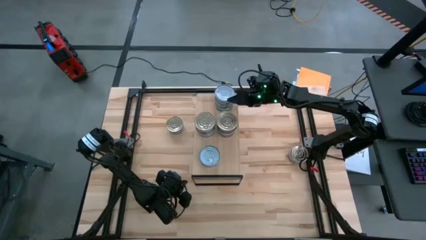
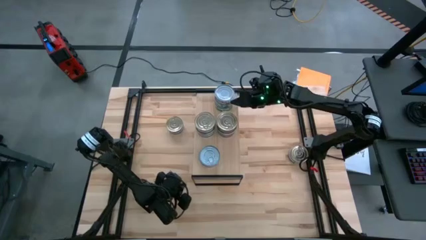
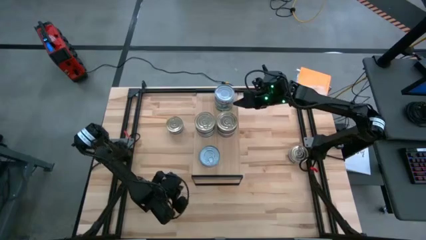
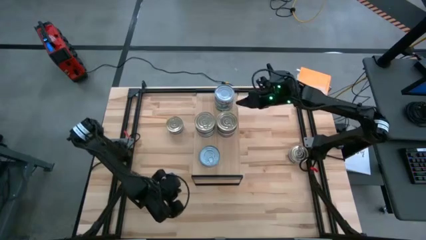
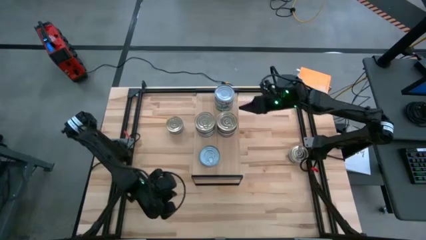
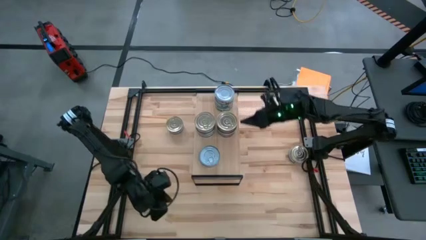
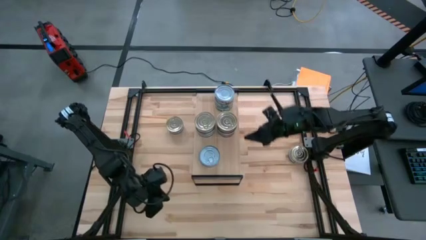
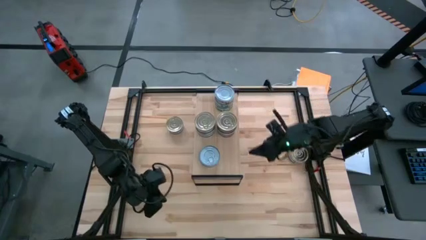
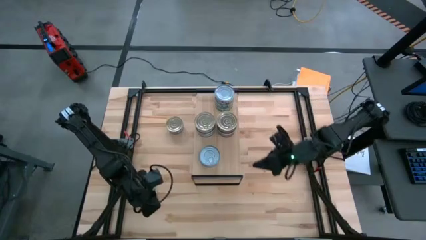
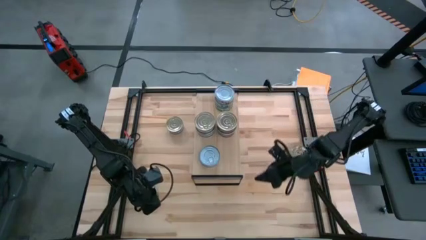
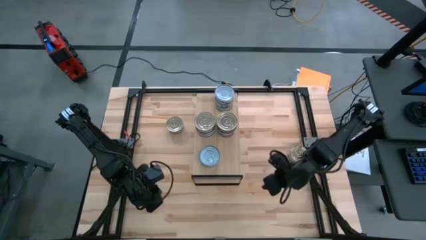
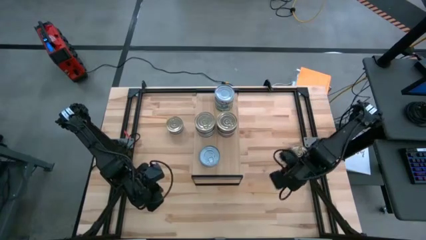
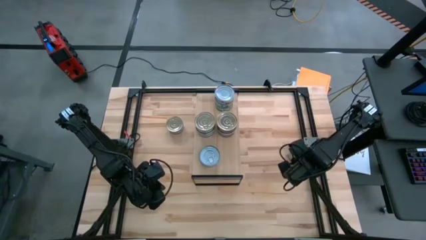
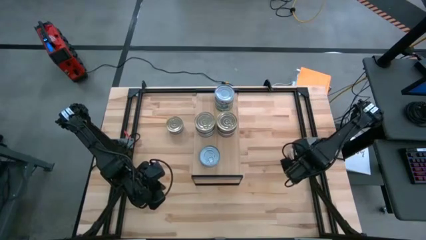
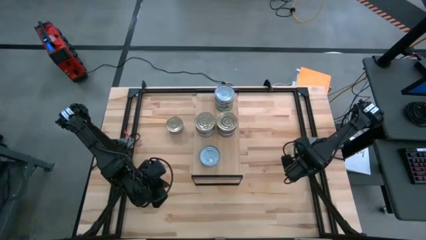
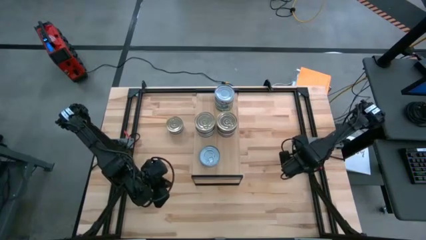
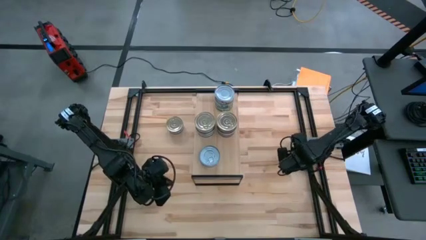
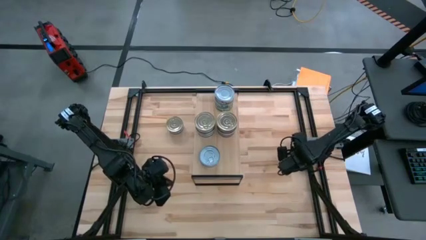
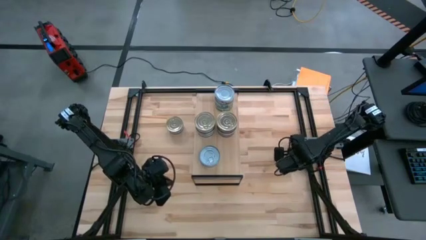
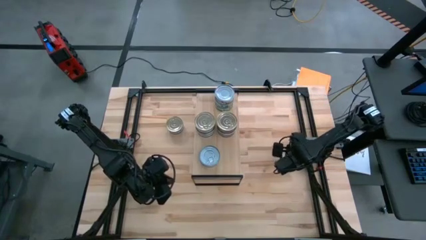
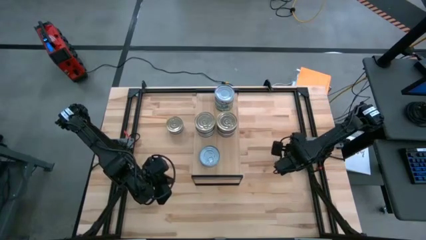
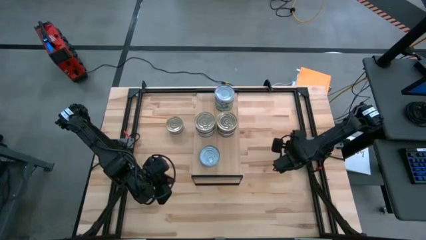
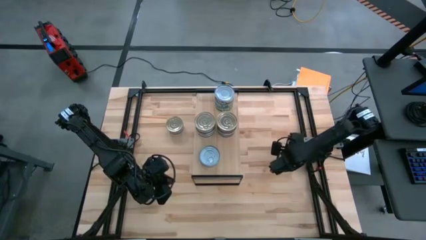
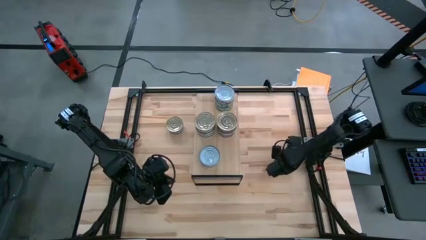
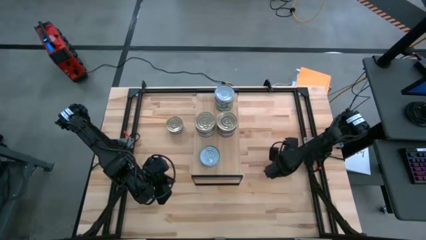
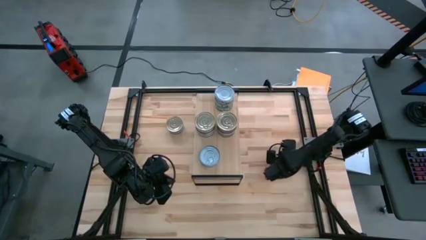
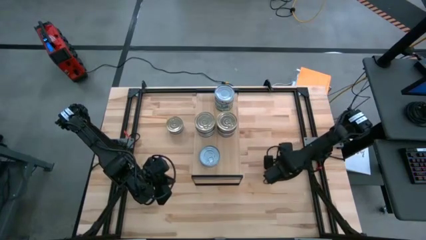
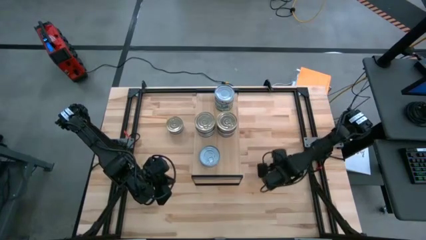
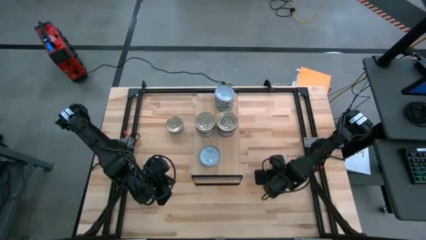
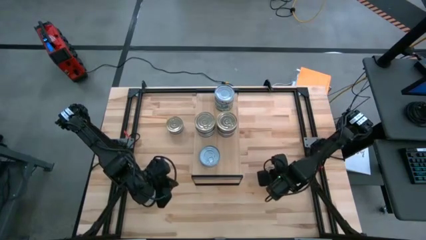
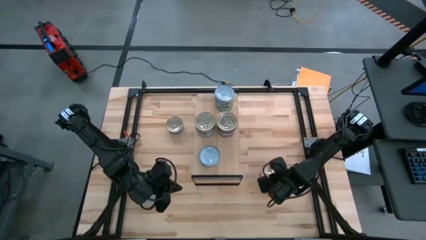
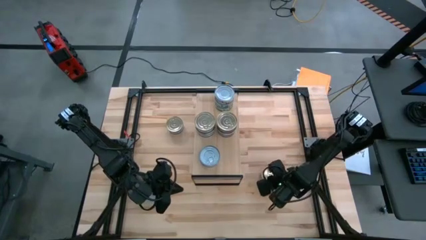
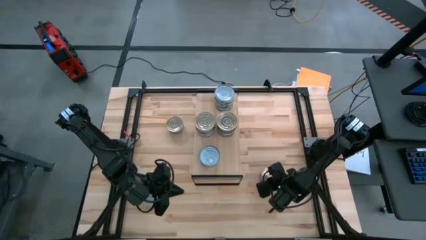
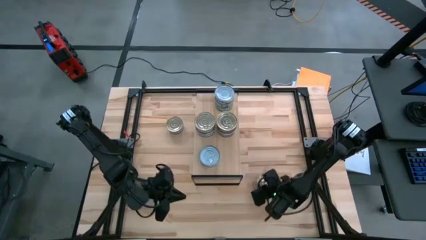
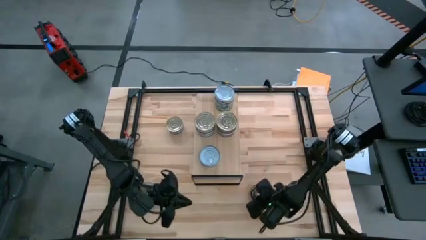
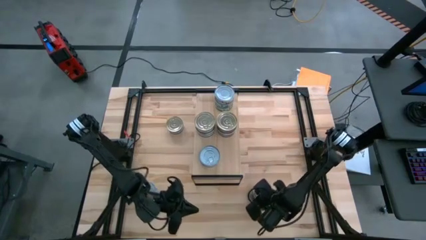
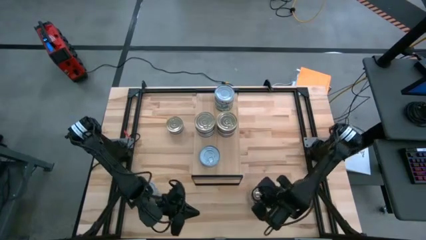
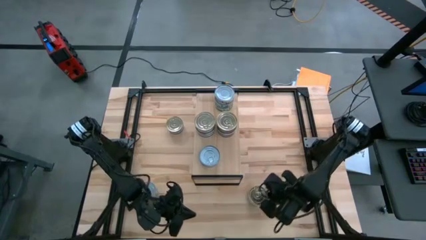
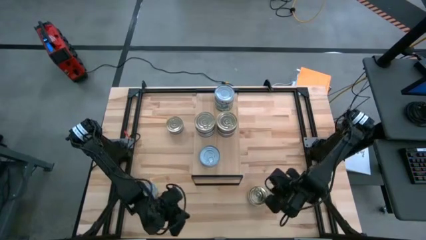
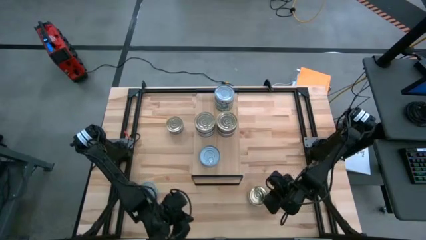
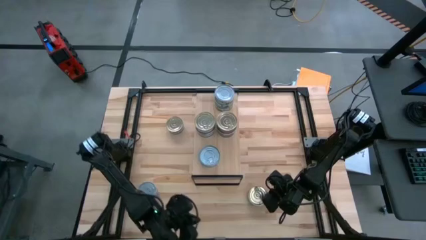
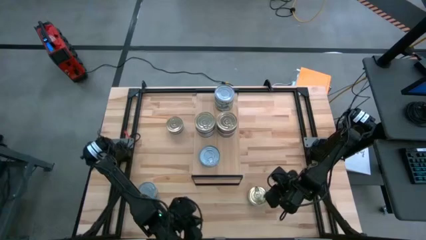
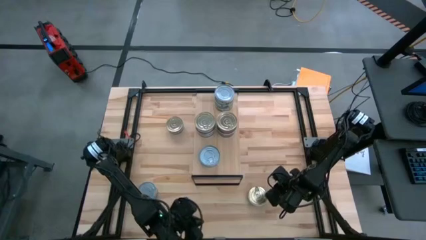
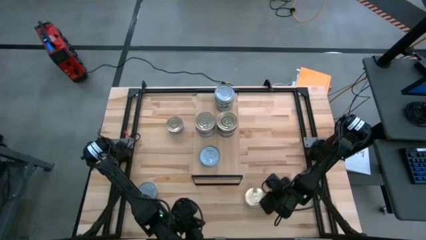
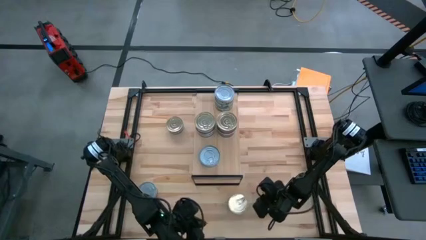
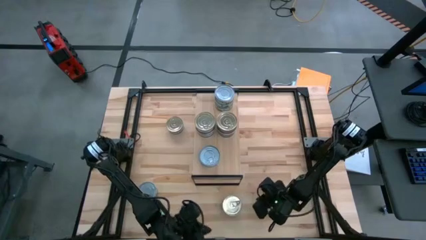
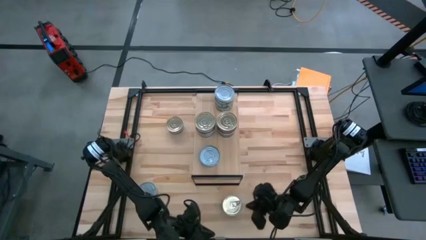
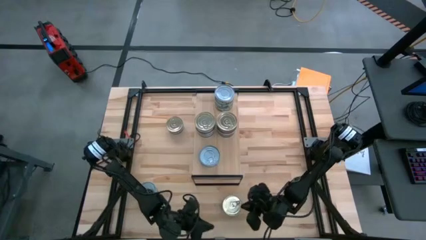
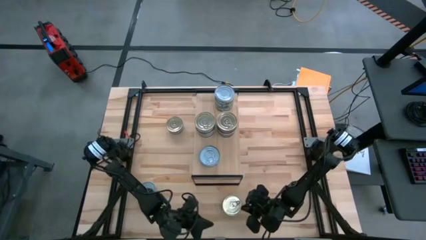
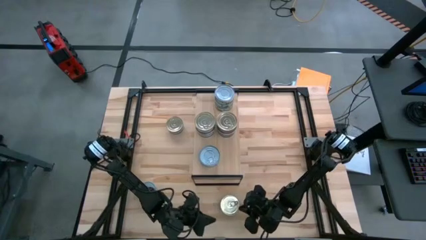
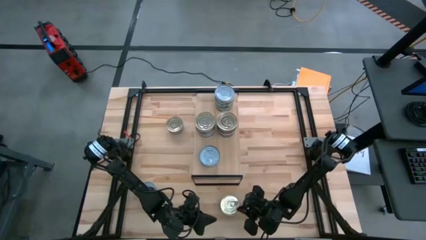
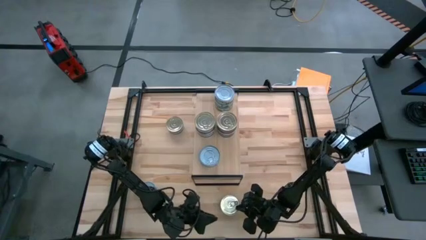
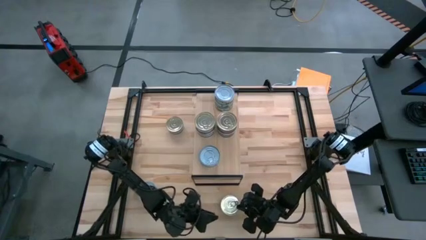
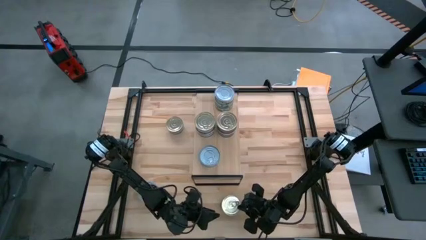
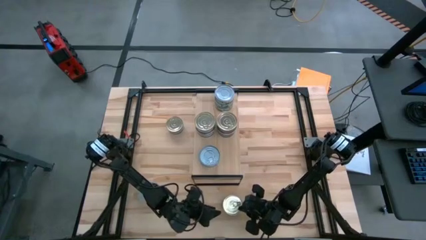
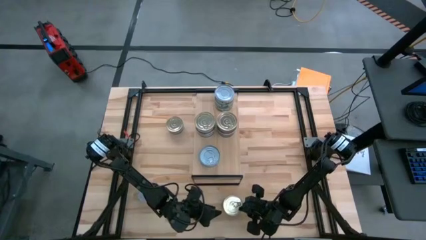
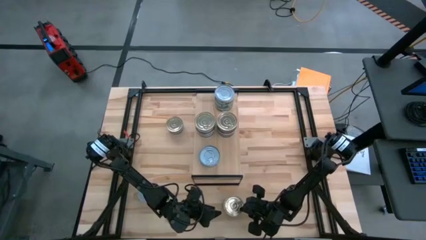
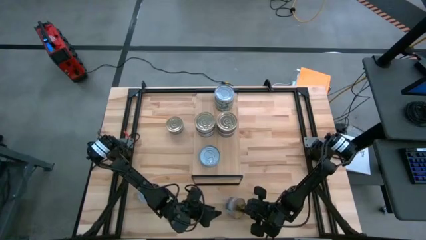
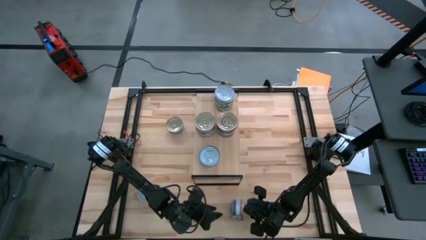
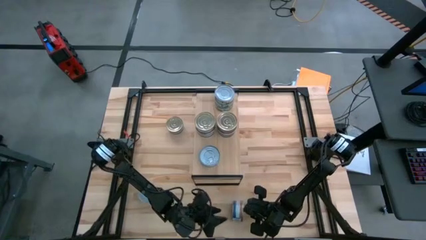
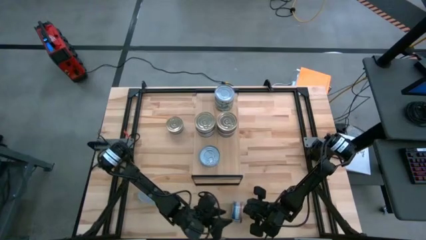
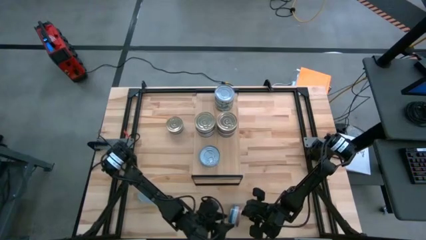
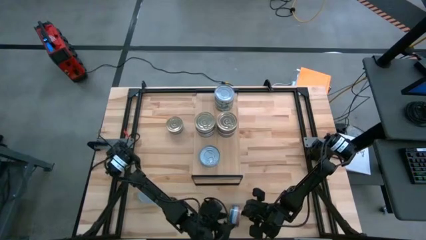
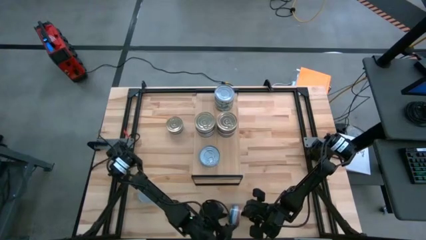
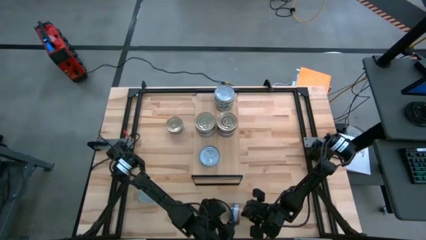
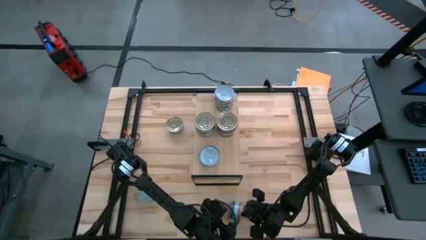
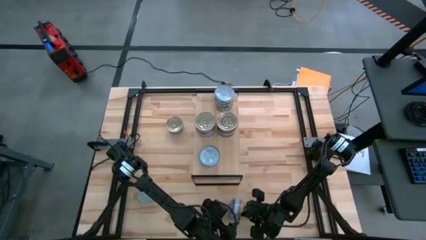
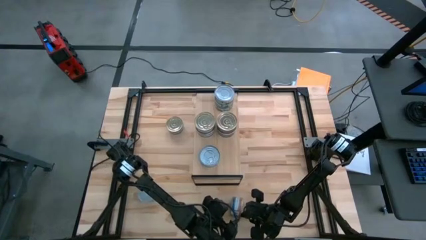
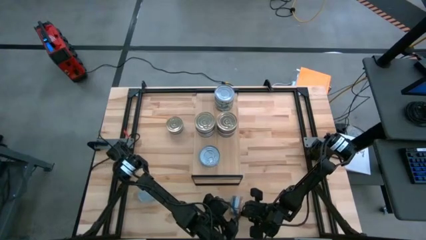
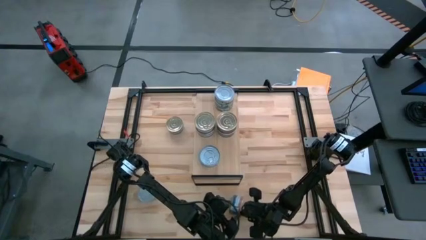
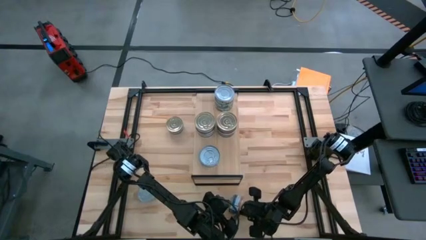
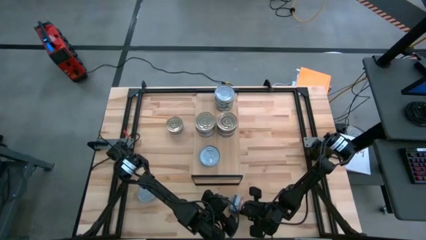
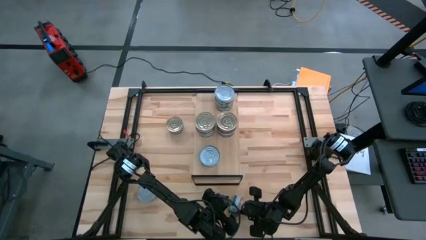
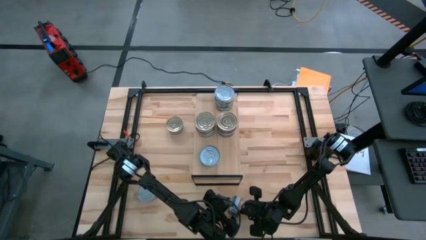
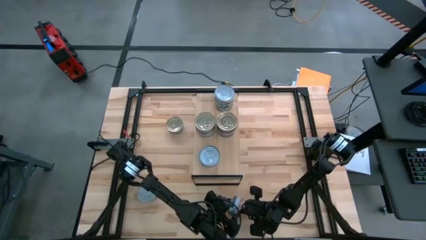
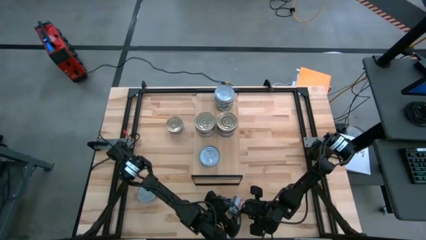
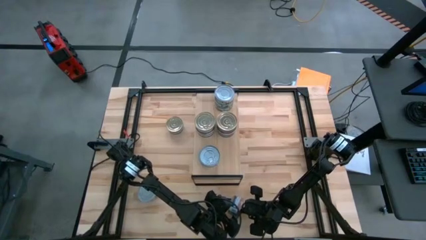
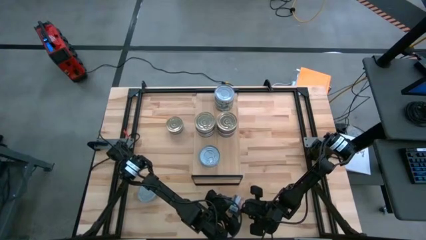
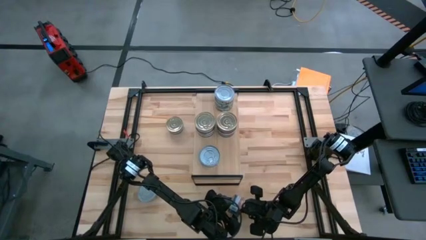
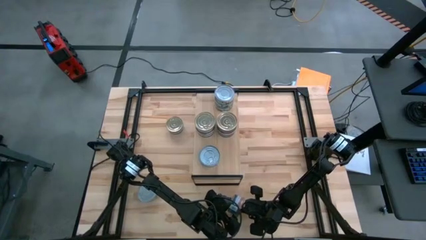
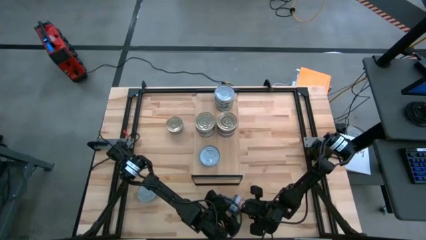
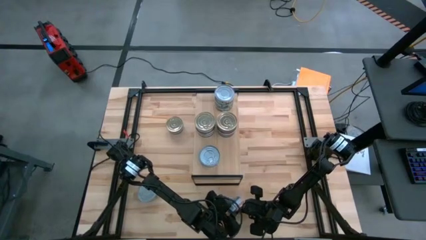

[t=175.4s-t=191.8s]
Task: Stack canned seafood by type on shelf
Stack the blue-pink tuna can on top of the blue-pink tuna can on the shelf aligned with the other blue-pink tuna can
